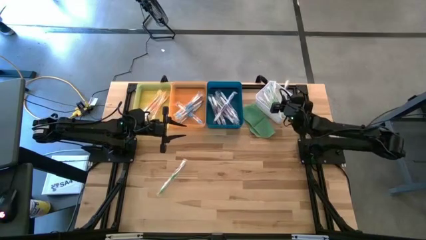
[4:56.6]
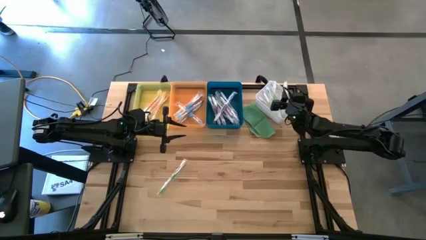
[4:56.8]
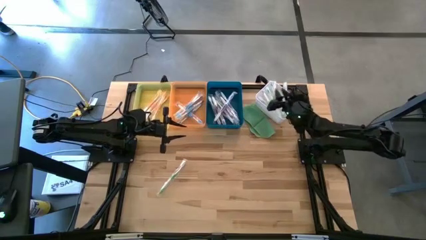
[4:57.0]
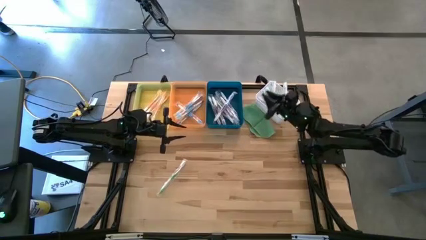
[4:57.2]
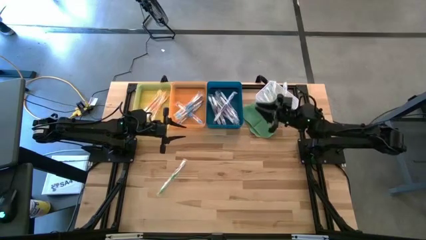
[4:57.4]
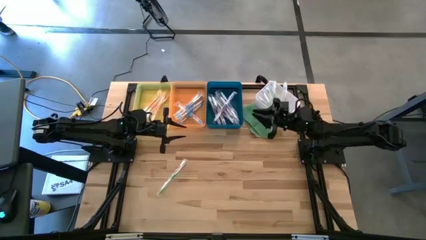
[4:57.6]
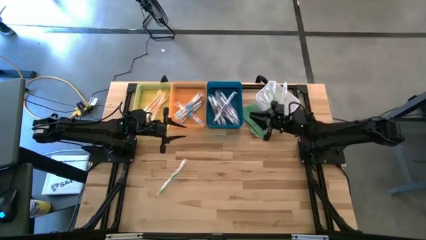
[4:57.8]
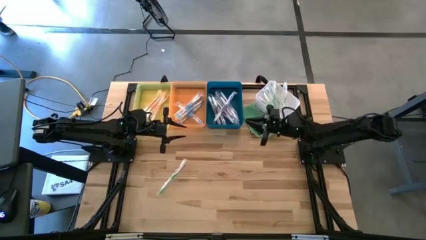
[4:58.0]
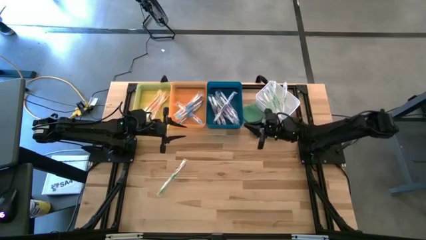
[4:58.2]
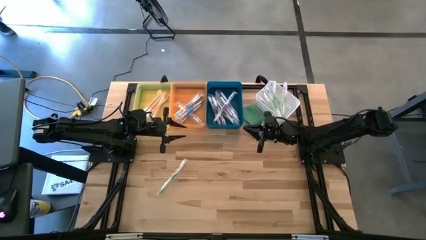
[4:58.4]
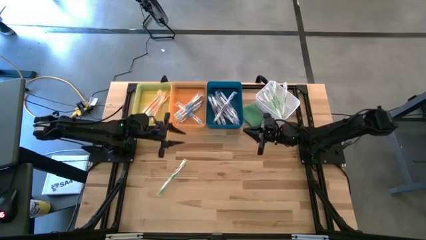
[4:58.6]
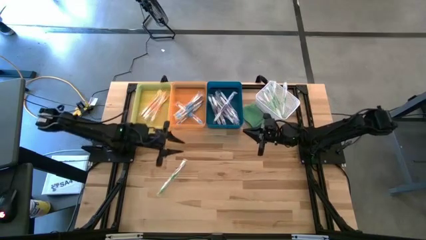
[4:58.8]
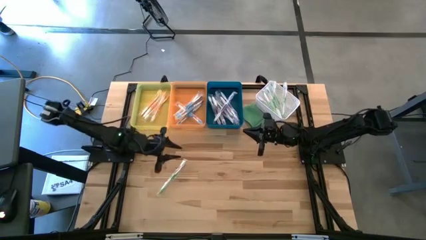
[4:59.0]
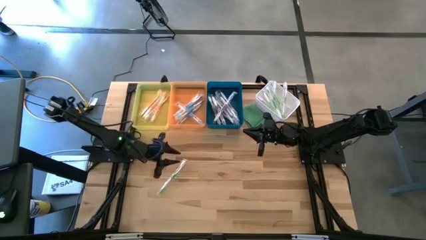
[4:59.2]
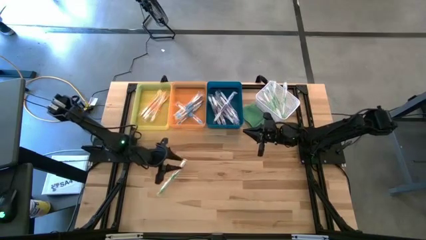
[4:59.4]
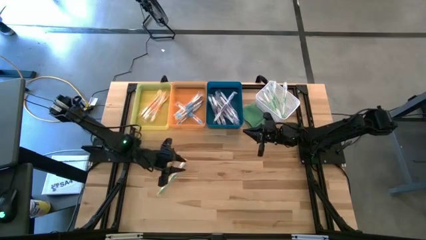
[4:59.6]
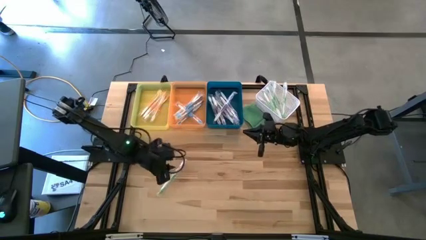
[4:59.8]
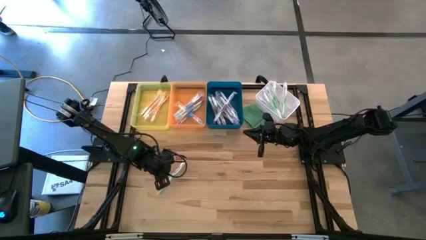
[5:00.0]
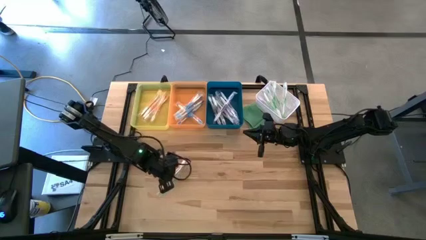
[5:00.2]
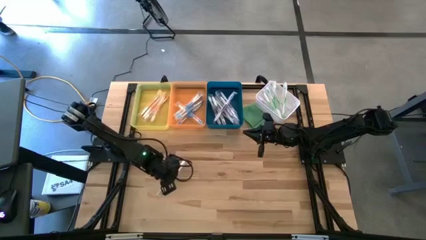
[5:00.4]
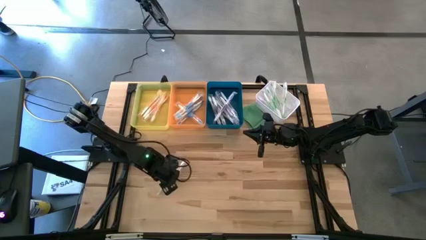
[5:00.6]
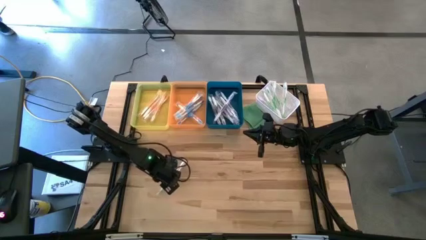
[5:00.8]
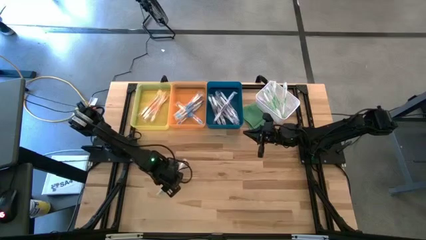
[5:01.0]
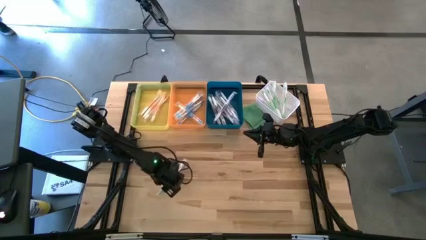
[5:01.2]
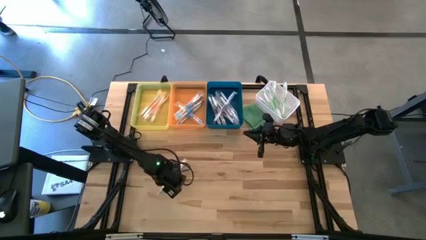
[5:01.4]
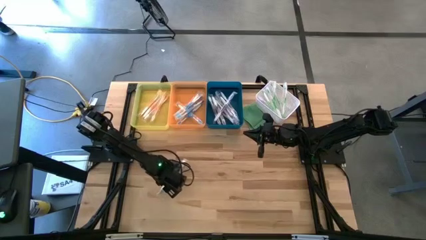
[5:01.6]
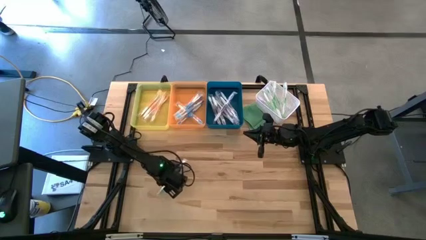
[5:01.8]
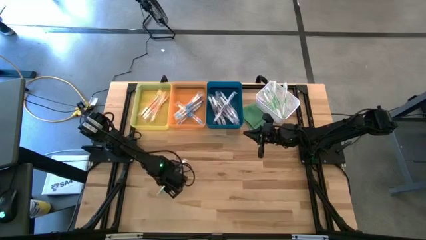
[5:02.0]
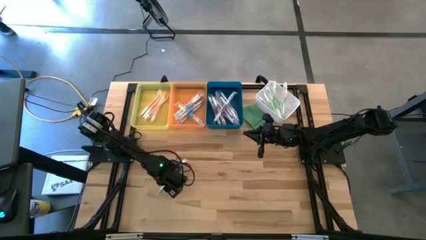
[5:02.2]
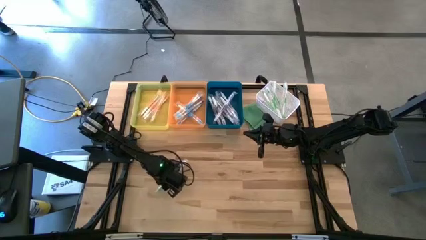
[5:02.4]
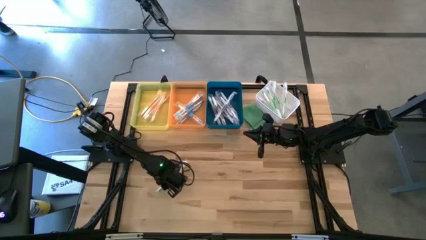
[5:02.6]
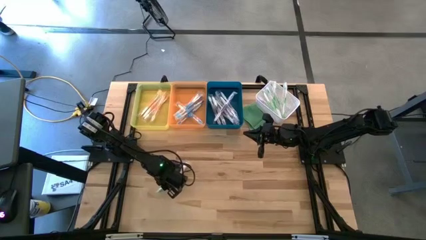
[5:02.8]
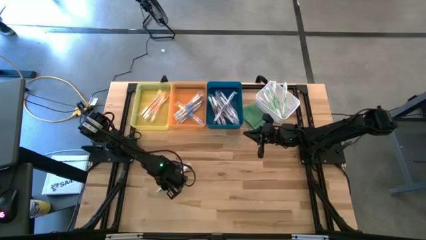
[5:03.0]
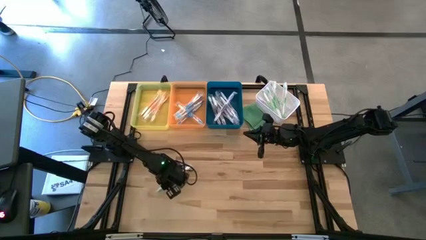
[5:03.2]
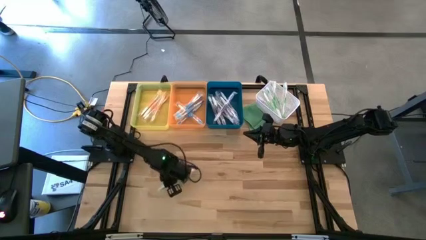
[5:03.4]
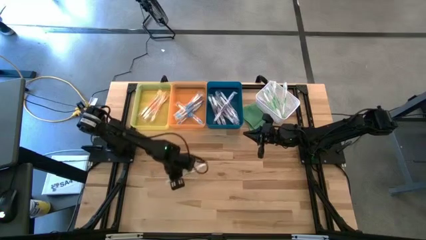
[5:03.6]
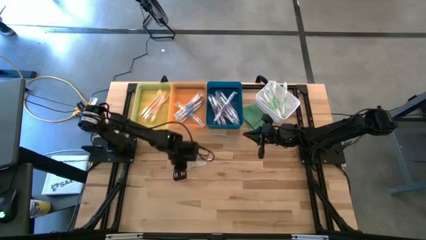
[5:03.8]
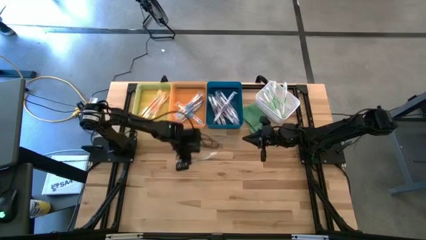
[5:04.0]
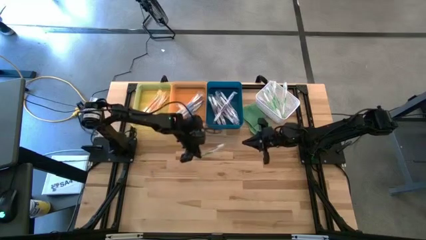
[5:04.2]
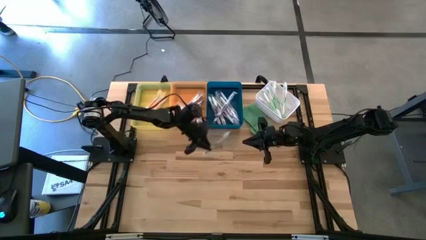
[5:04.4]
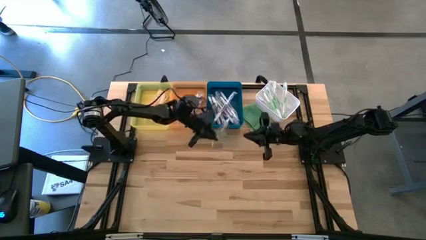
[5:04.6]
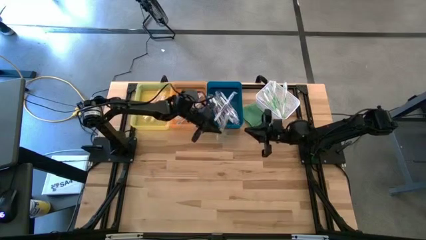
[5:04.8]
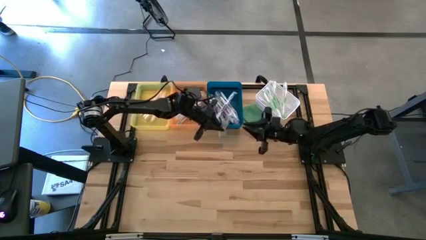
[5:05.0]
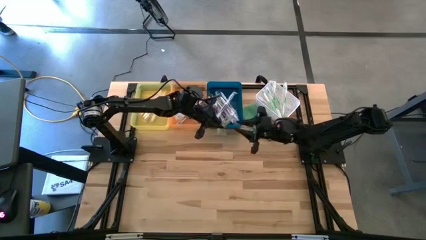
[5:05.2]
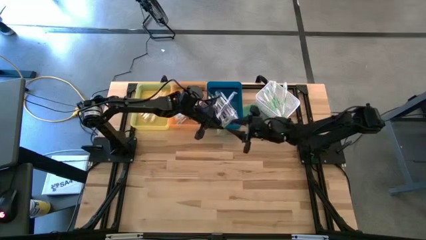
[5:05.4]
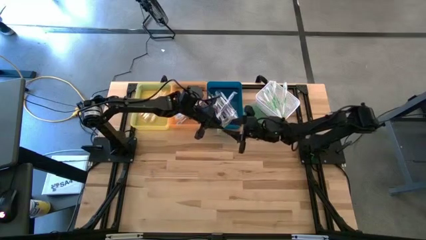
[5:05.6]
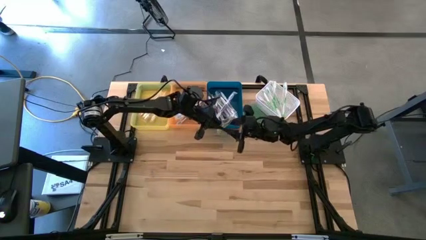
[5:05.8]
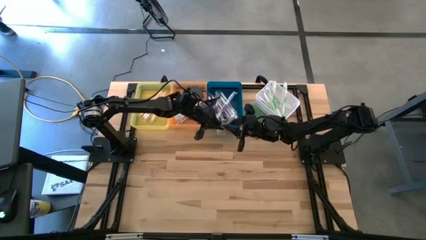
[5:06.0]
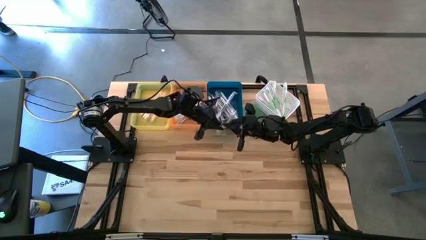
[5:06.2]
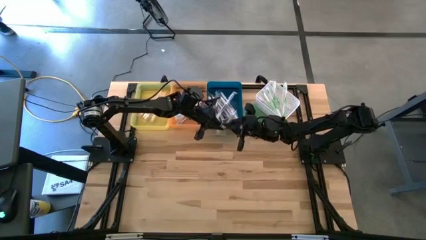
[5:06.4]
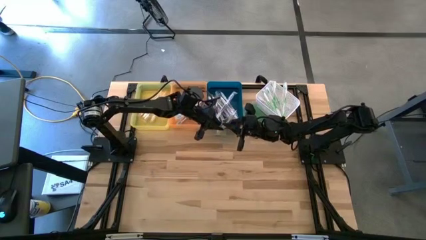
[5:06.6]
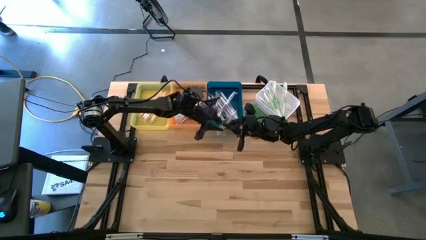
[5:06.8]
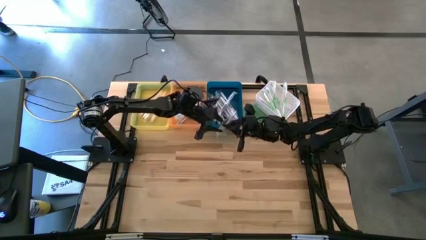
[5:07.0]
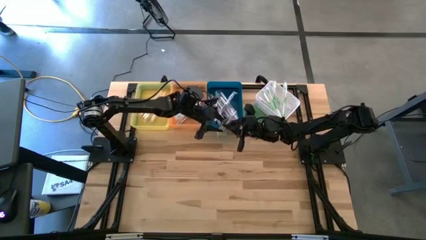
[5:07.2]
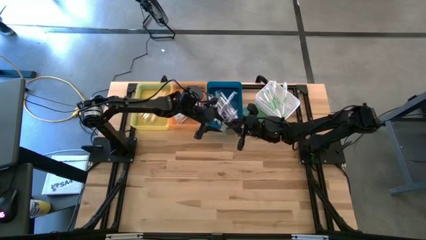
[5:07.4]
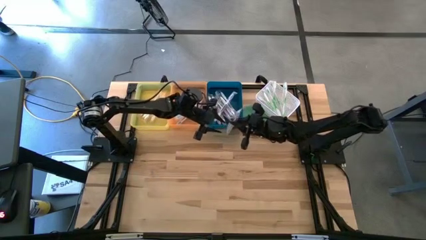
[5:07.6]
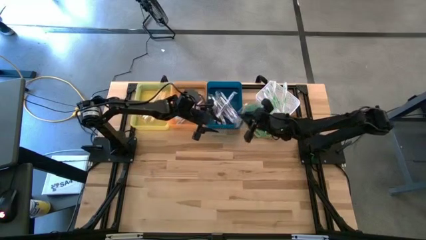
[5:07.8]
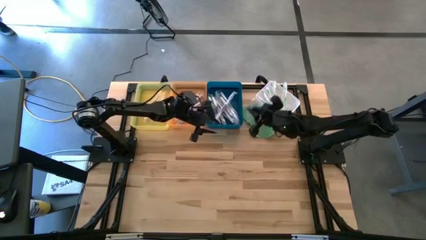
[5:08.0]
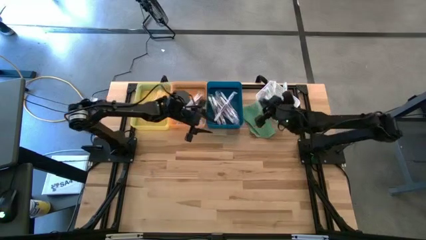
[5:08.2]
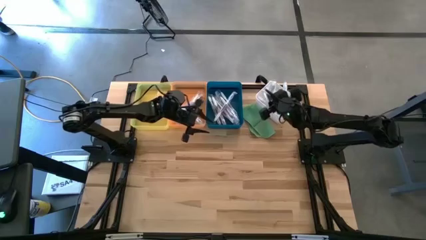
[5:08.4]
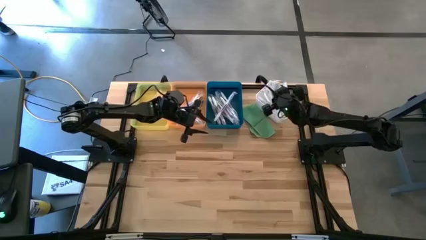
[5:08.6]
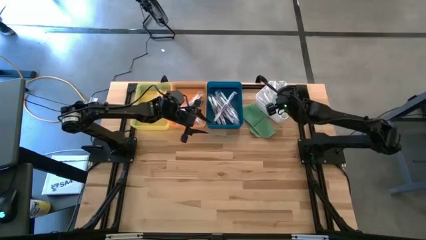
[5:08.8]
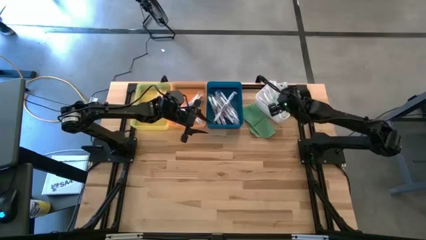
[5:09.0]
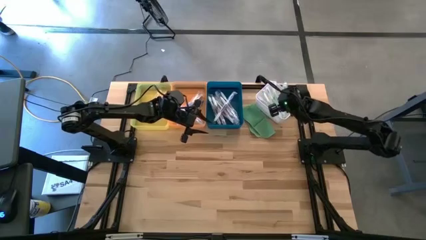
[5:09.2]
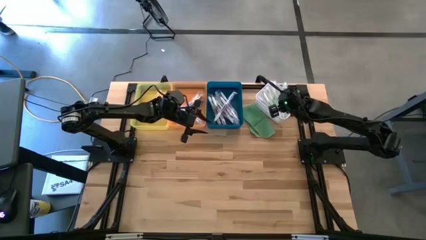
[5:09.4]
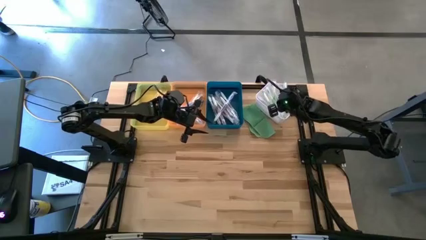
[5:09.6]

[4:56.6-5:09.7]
Task: Pick & Place Toothbrushes
Put the green toothbrush into the white bin
